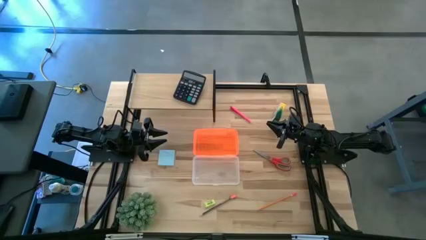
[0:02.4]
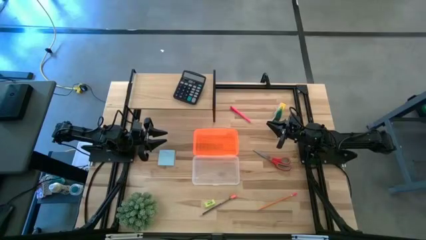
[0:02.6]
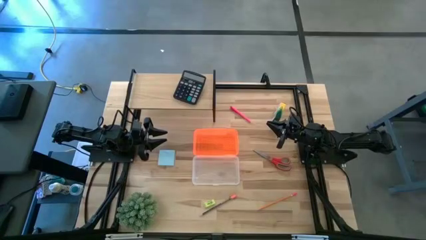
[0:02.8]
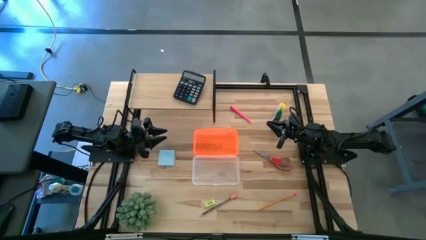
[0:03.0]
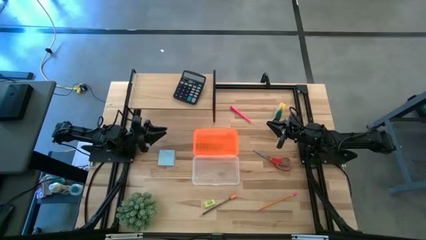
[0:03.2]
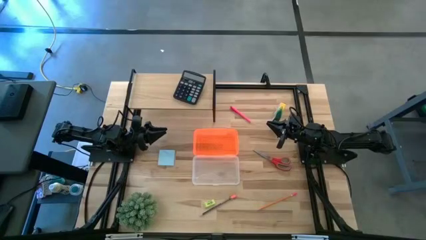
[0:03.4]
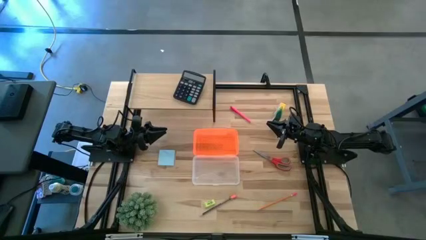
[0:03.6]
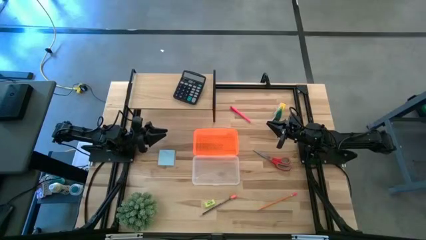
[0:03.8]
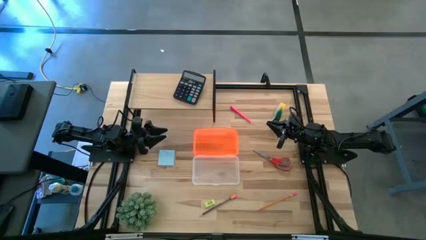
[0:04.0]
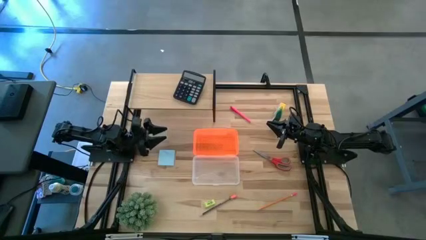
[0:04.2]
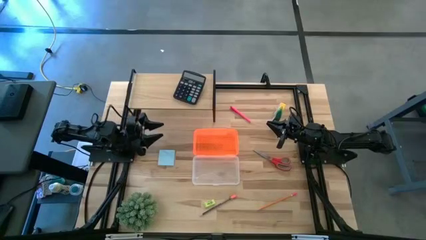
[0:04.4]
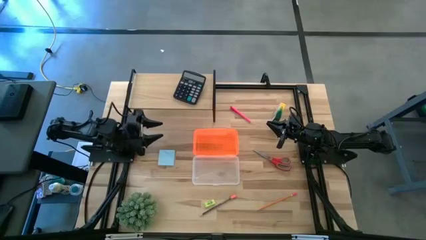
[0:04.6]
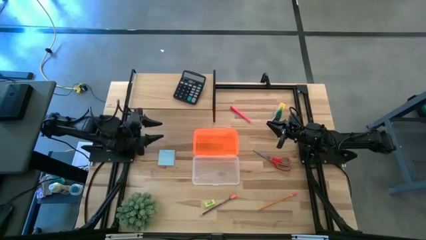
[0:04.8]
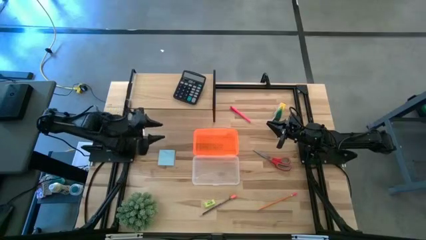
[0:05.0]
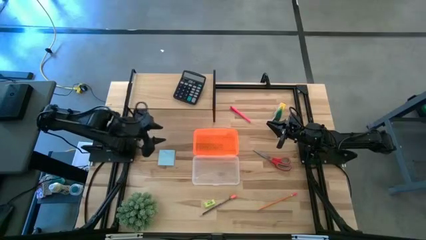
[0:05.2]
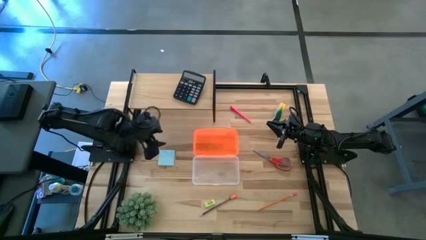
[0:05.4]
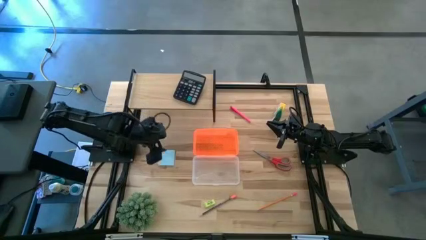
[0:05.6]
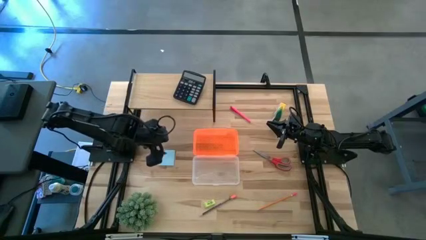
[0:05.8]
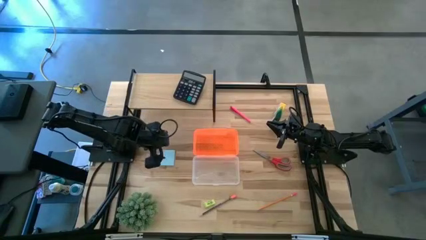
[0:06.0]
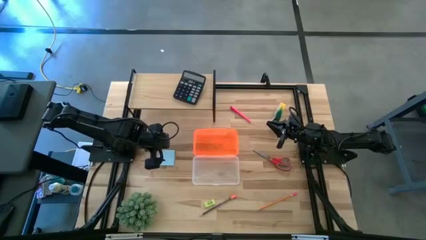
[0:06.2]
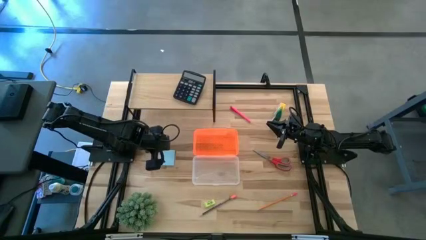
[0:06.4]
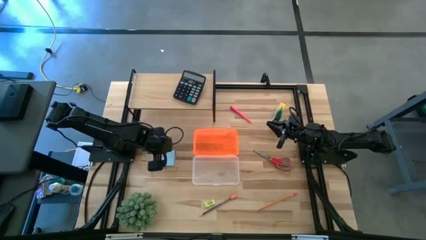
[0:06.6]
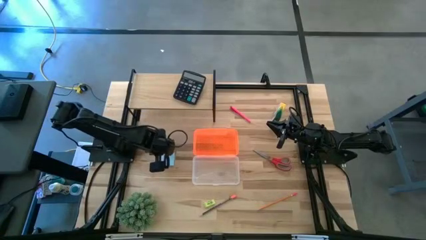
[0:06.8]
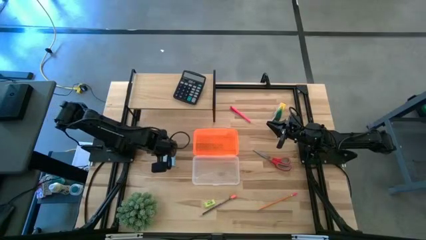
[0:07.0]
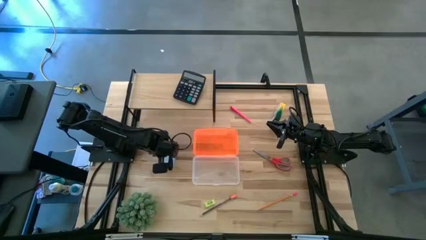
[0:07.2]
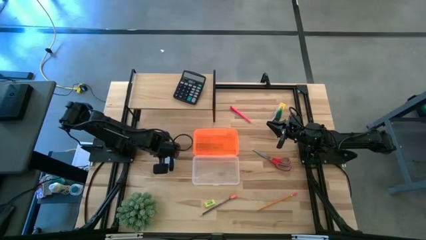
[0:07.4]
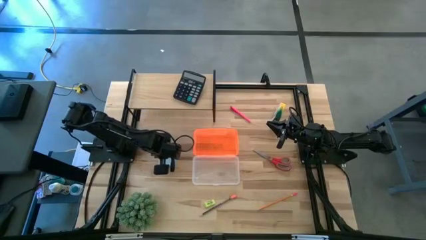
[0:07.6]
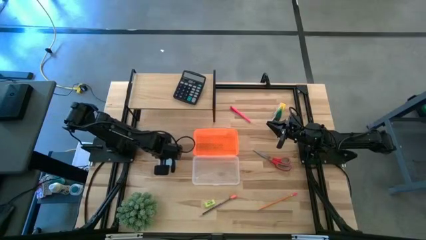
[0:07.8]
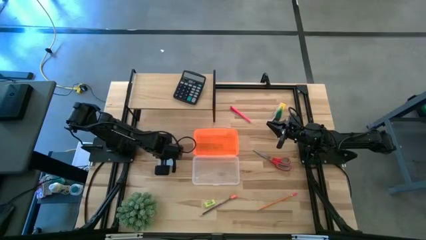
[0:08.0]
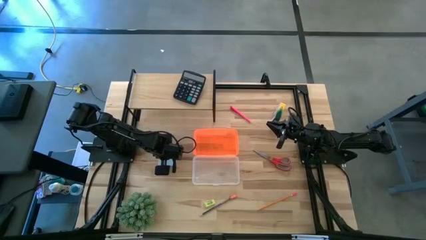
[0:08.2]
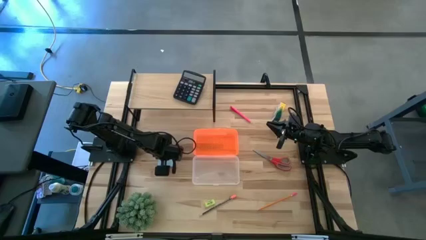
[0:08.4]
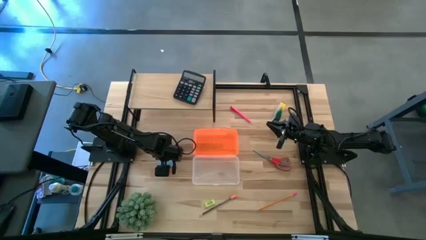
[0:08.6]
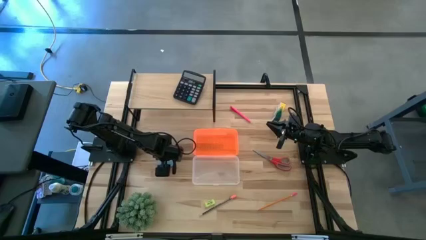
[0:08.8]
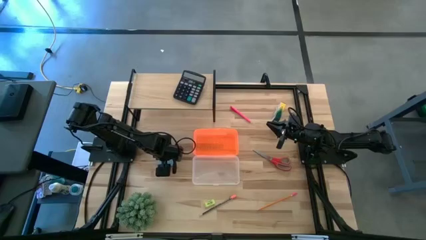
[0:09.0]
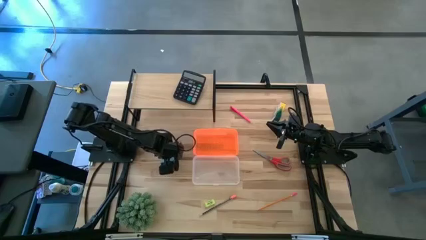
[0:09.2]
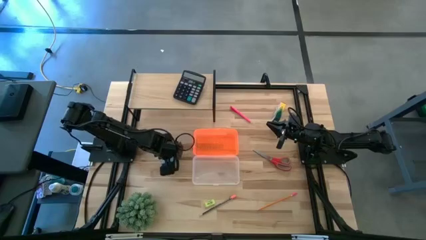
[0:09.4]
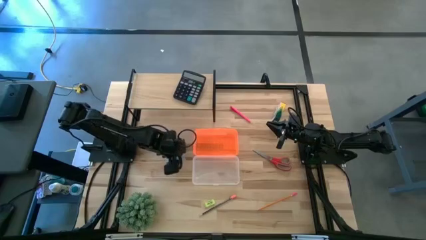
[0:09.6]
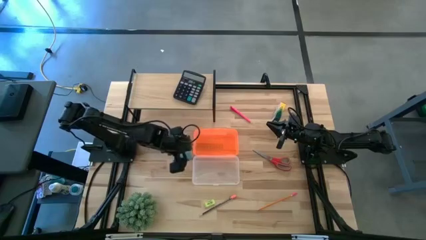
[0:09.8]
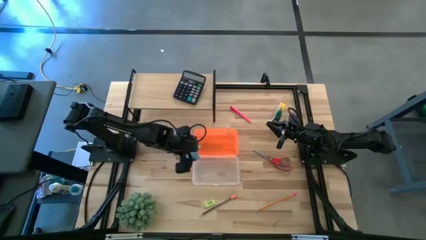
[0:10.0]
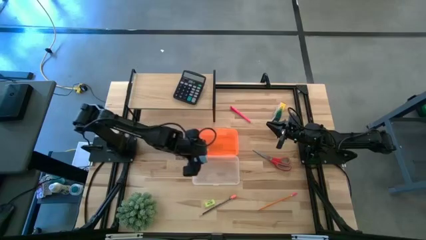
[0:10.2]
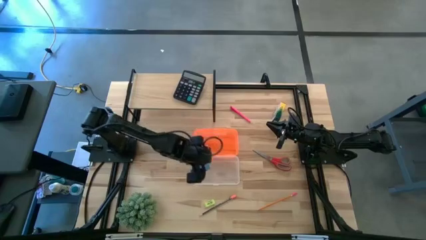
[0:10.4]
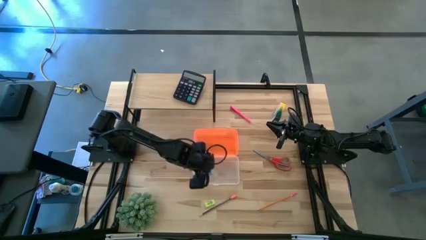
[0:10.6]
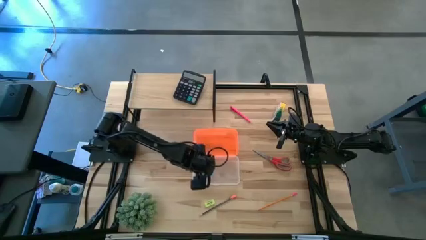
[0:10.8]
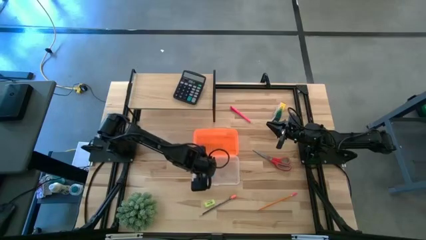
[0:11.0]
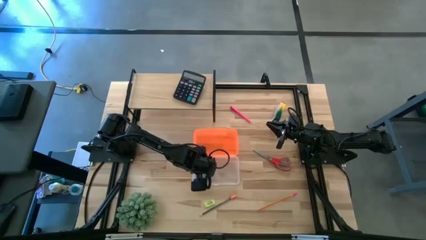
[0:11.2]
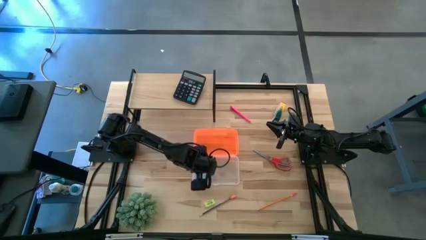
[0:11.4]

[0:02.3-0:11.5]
Task: Pack school essentials
Put the blue sticky note into the school supply box

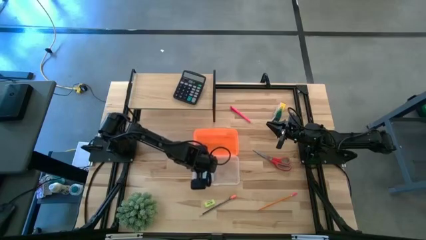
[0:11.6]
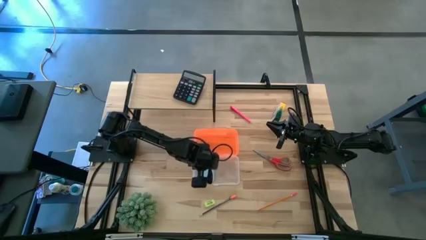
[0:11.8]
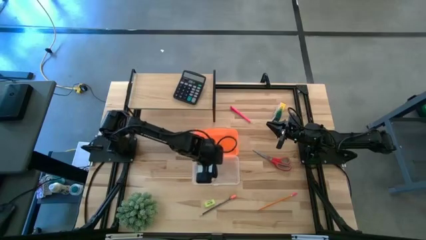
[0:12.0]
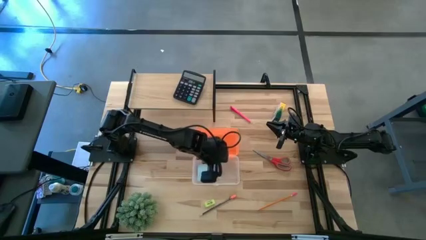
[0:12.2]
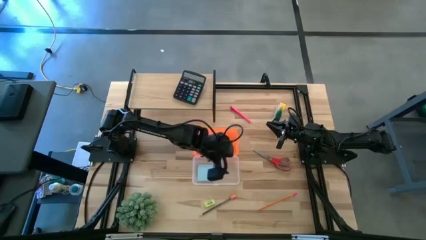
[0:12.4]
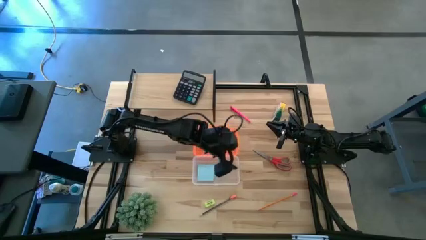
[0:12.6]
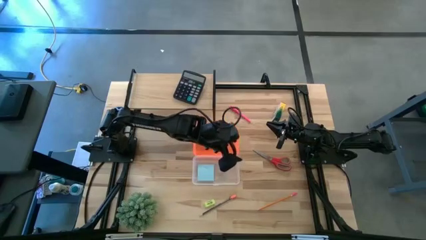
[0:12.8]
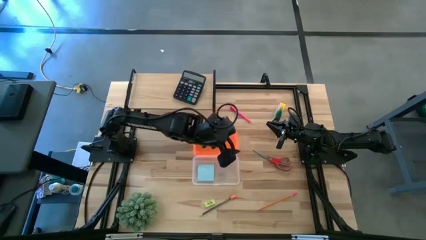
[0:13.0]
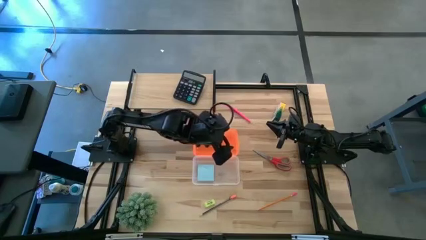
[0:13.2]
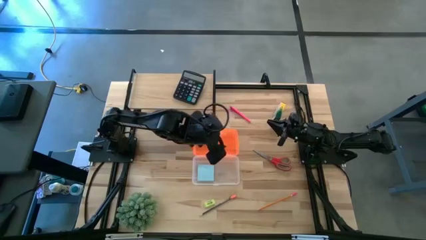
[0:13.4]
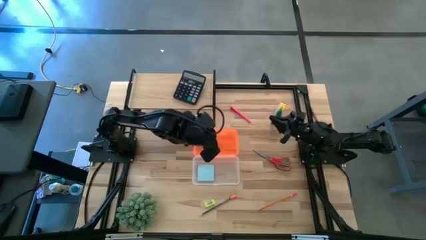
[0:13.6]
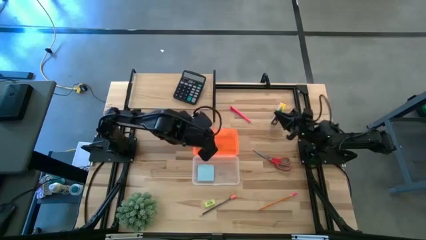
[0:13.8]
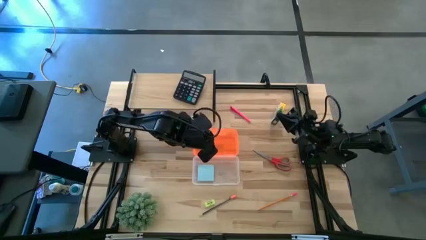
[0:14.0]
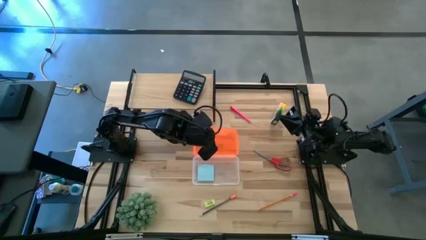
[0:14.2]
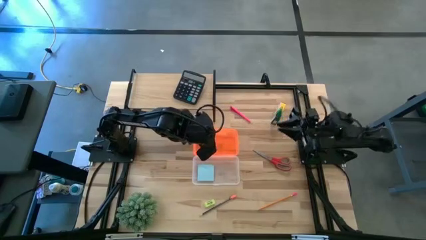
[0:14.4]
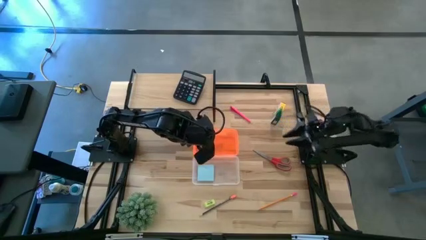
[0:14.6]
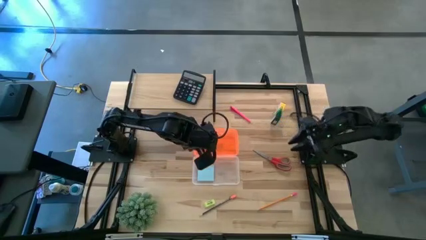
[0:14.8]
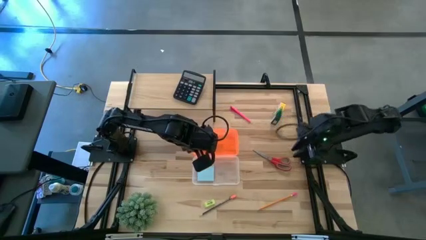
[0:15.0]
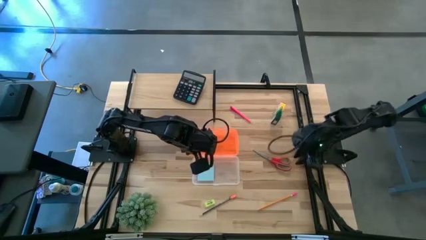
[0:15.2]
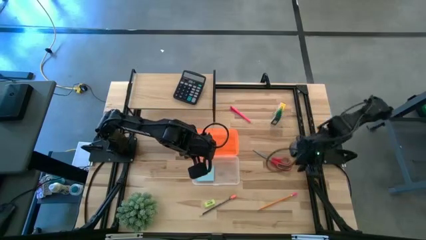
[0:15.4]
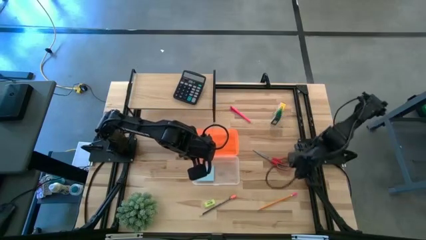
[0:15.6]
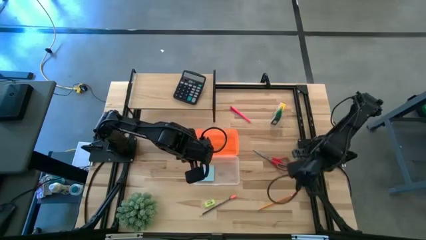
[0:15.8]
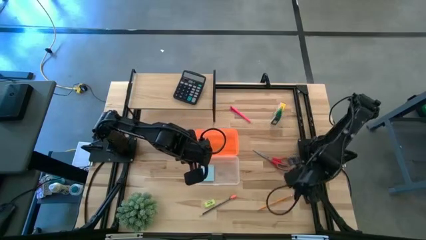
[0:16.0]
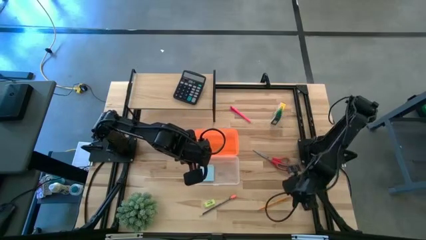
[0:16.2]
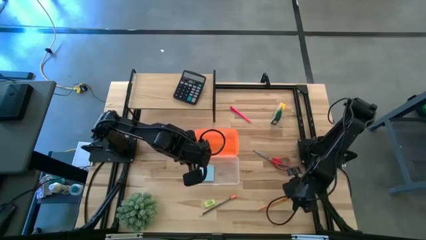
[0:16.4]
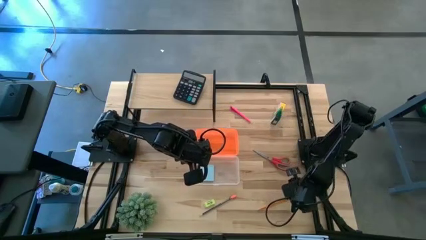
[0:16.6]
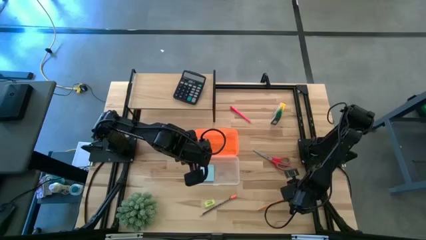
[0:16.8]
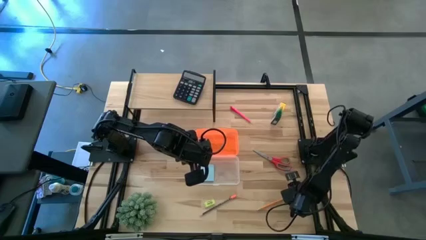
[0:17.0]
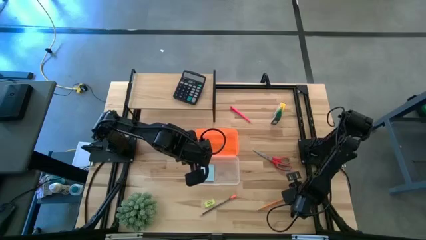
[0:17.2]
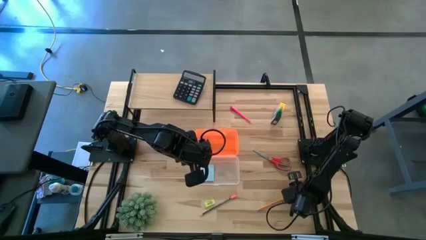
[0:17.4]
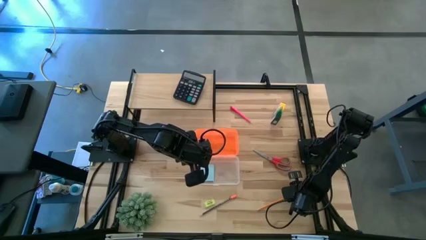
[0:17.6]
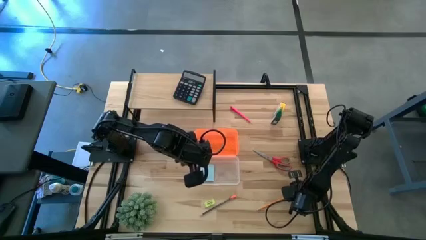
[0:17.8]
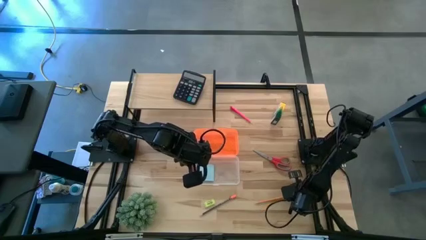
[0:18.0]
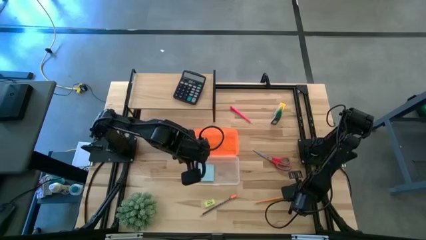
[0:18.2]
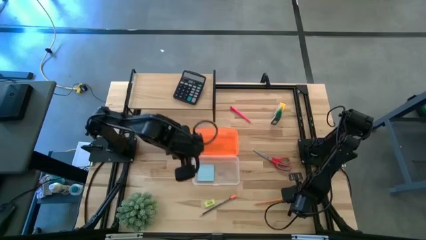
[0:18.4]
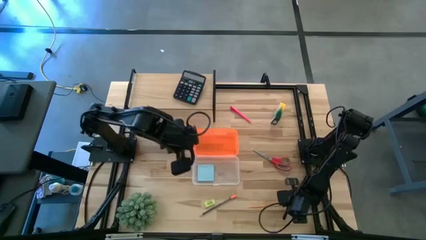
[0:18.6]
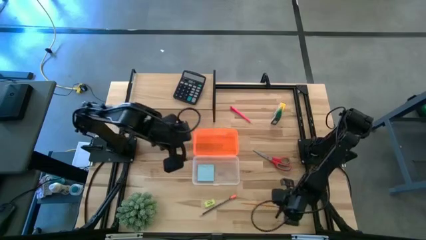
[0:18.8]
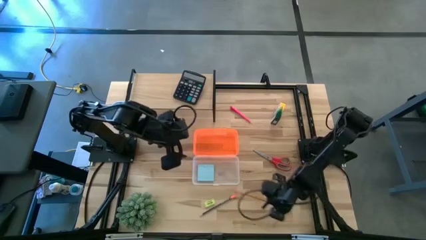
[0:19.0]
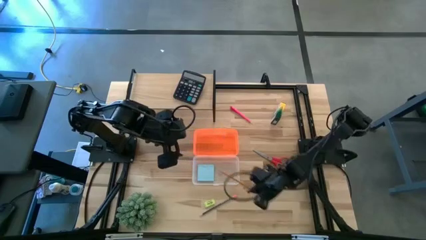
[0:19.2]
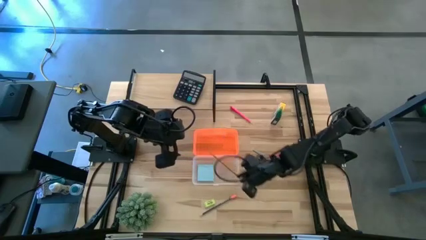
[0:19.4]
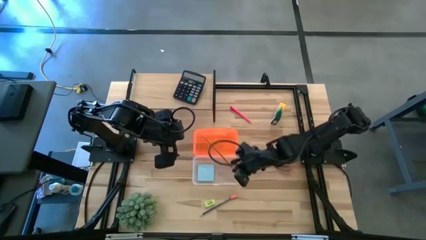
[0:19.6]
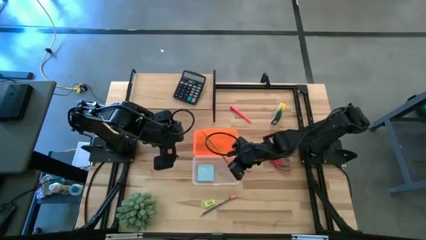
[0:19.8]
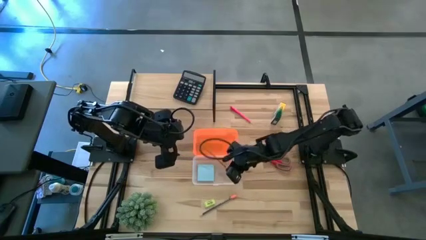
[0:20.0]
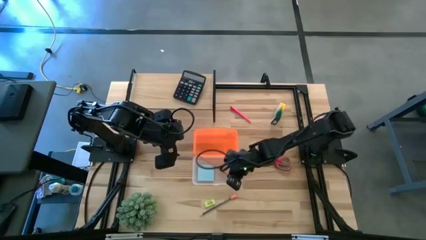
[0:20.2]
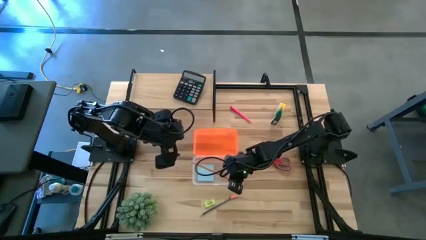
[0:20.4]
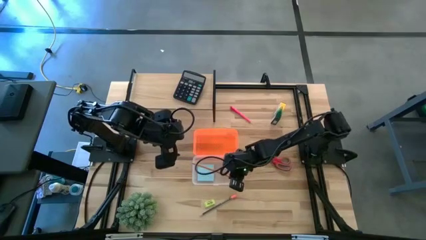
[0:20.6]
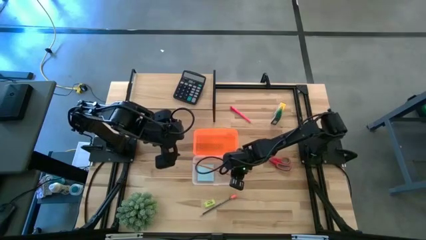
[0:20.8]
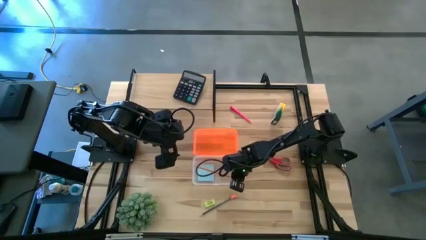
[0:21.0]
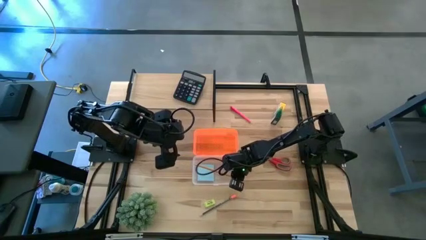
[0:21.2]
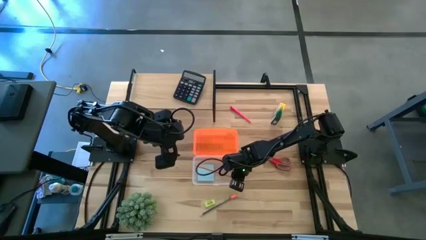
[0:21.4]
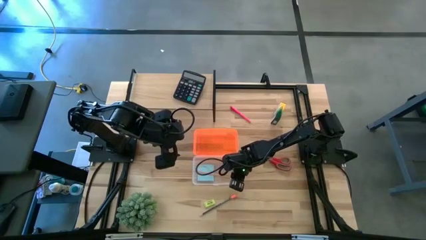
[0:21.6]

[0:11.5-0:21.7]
Put the yellow pencil into the school supply box
